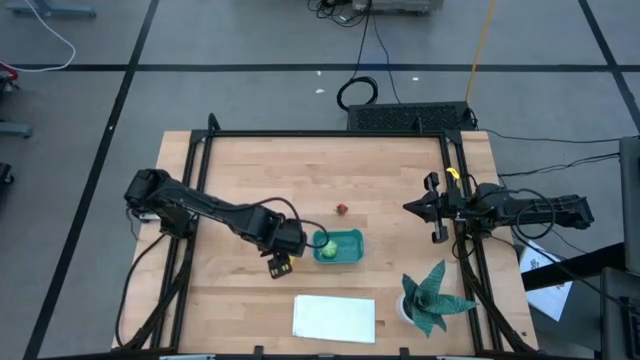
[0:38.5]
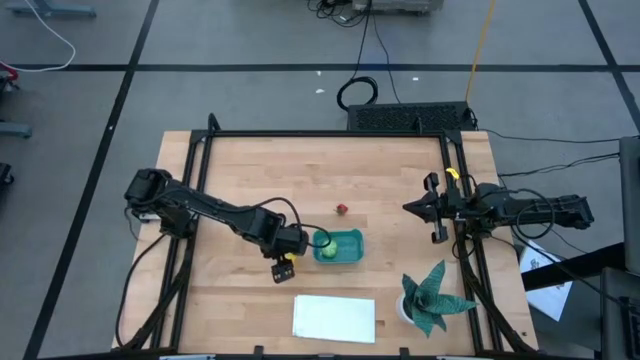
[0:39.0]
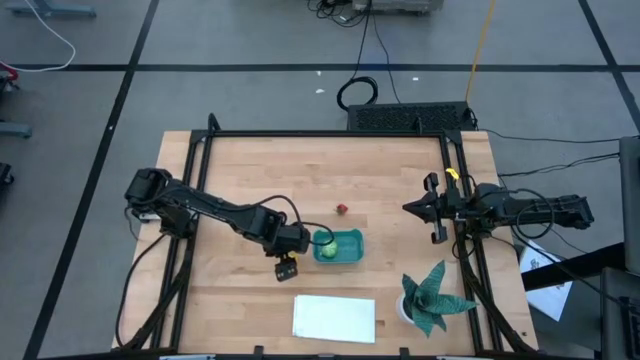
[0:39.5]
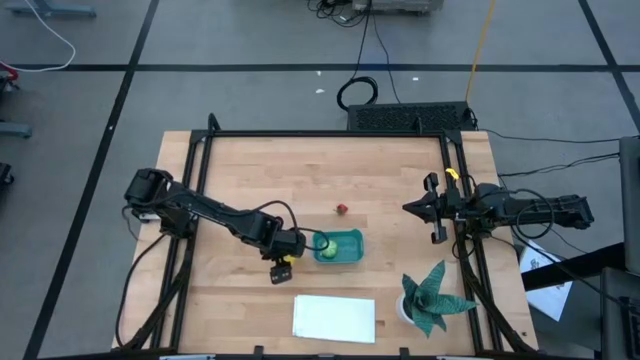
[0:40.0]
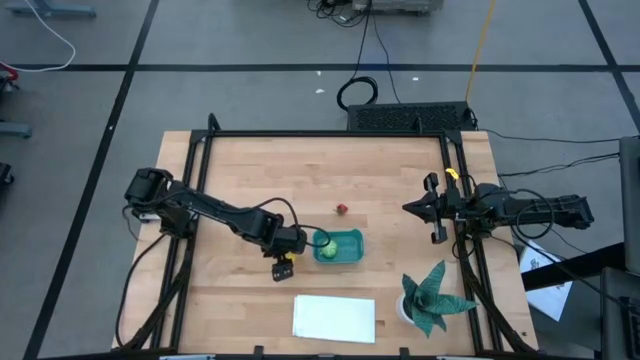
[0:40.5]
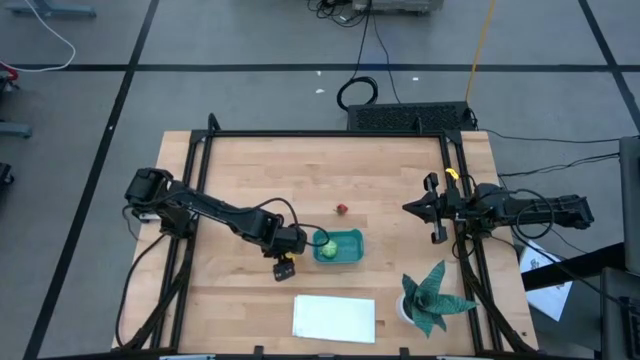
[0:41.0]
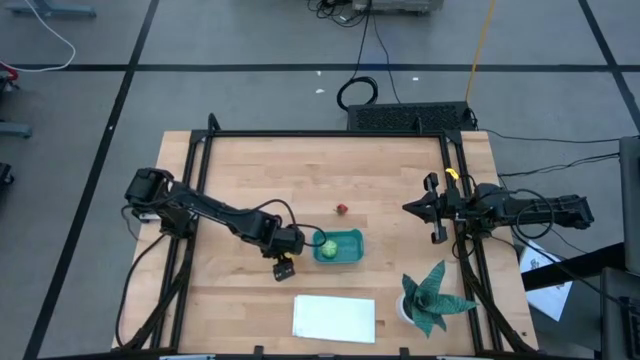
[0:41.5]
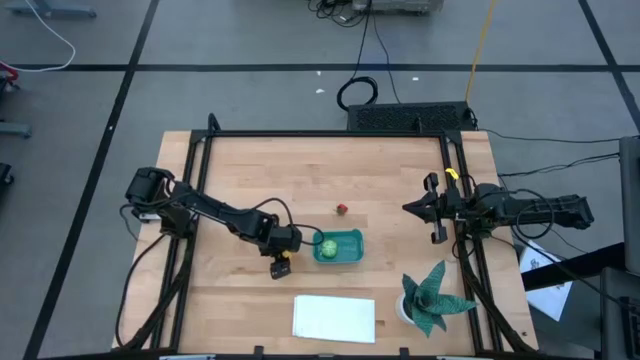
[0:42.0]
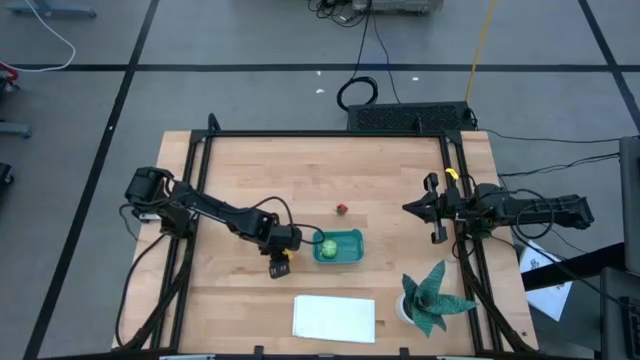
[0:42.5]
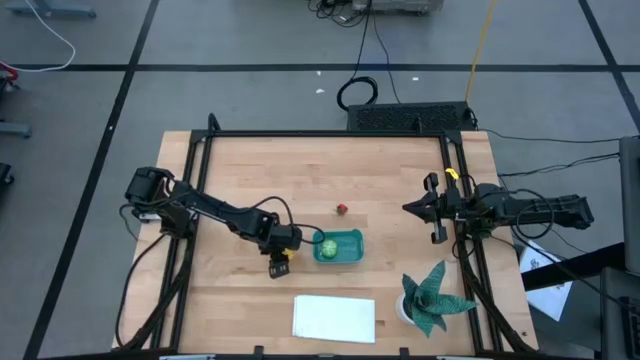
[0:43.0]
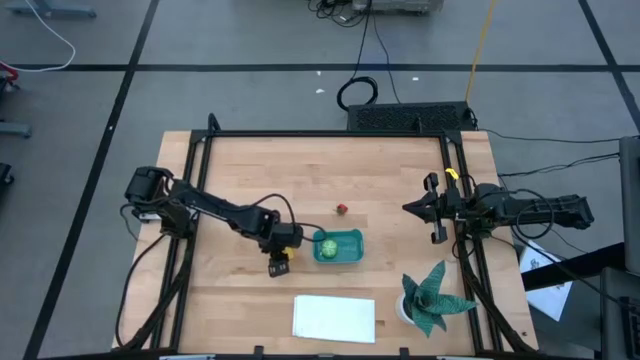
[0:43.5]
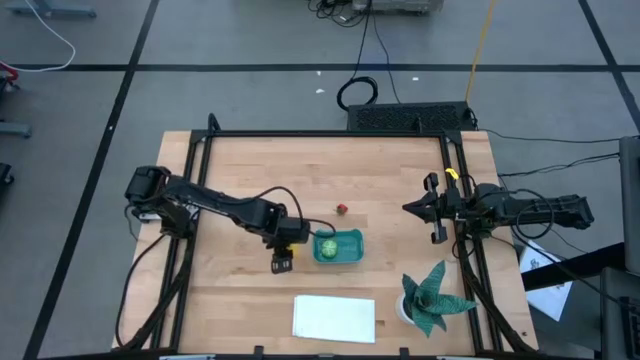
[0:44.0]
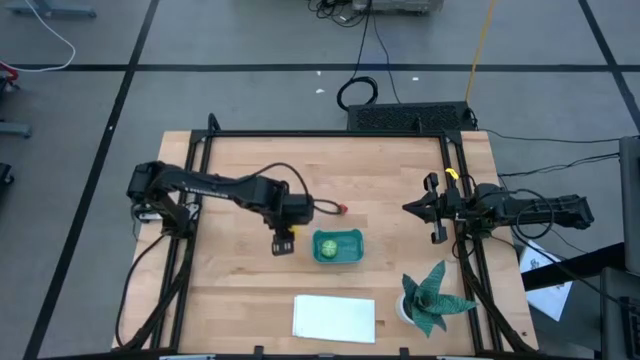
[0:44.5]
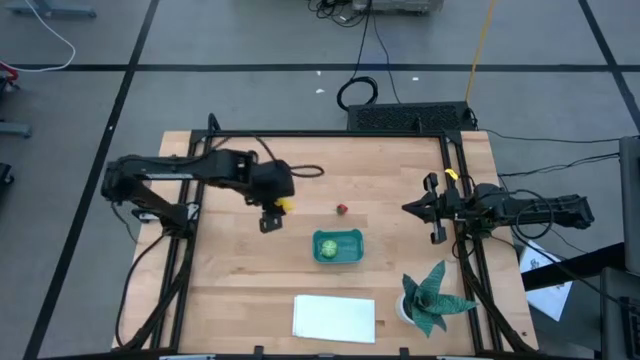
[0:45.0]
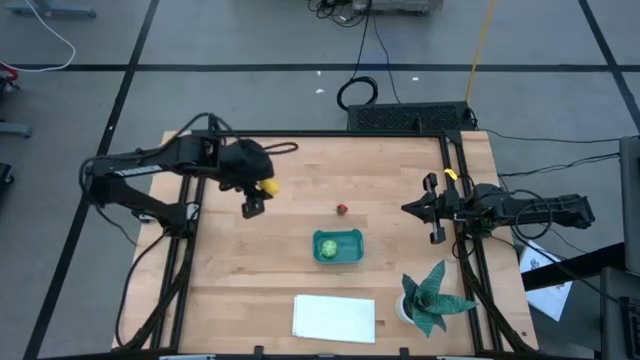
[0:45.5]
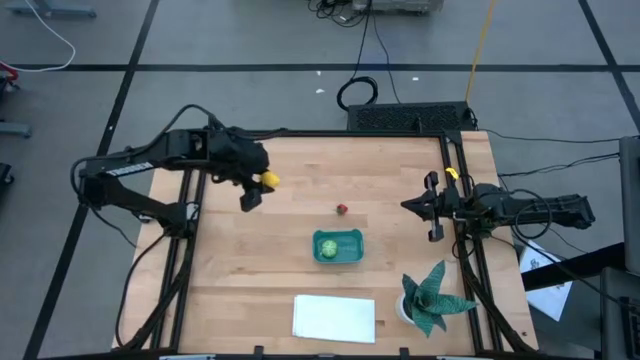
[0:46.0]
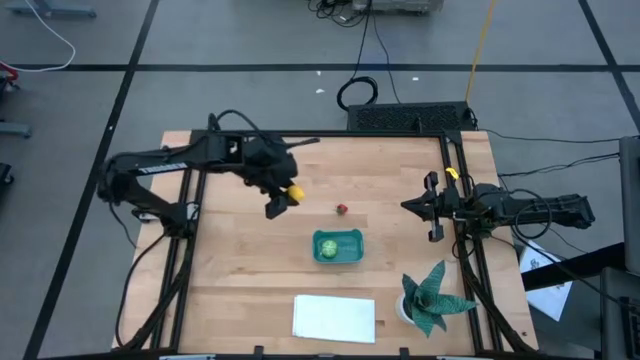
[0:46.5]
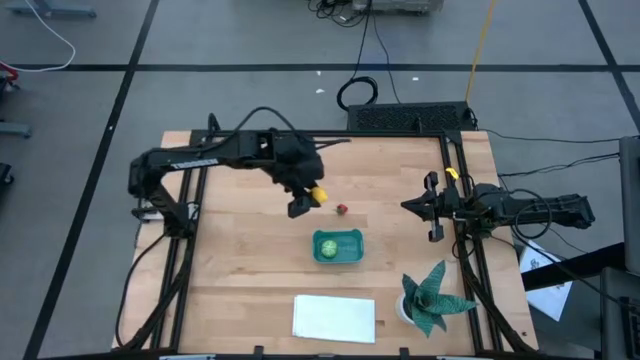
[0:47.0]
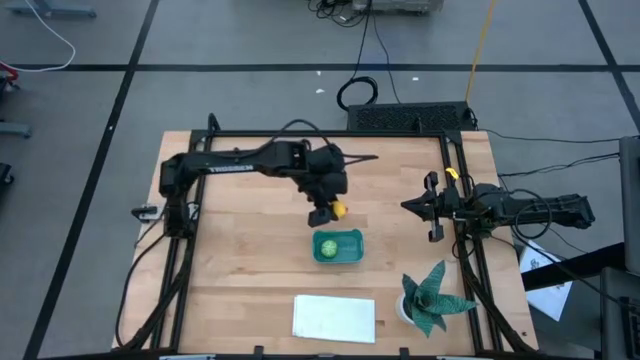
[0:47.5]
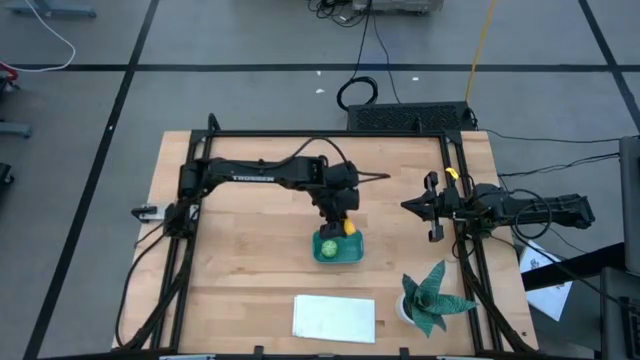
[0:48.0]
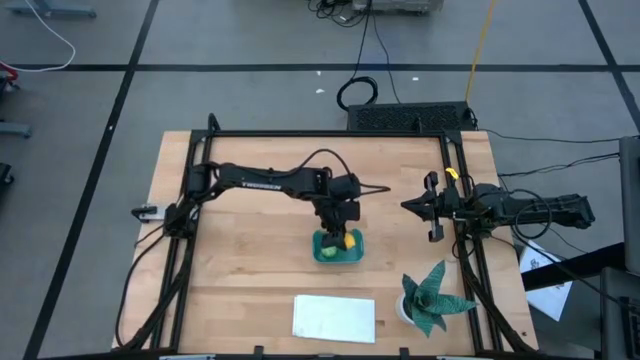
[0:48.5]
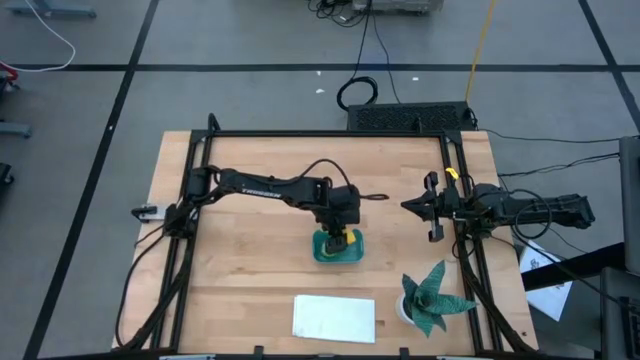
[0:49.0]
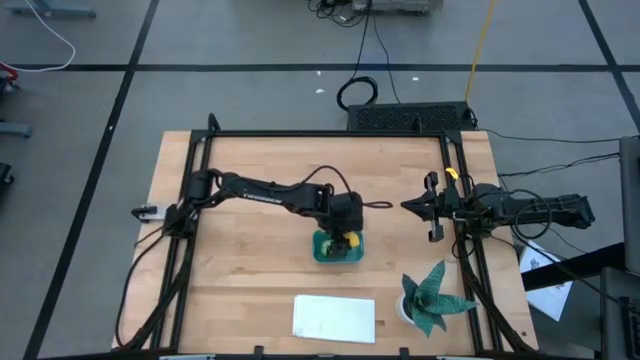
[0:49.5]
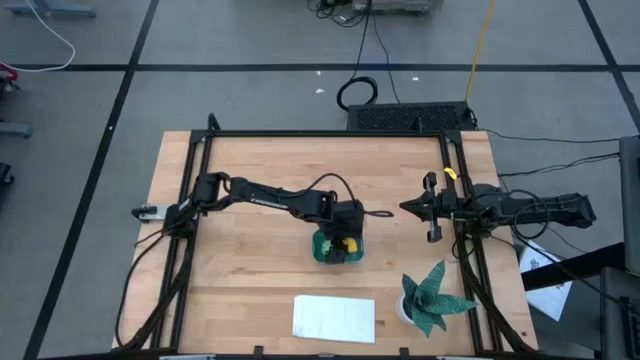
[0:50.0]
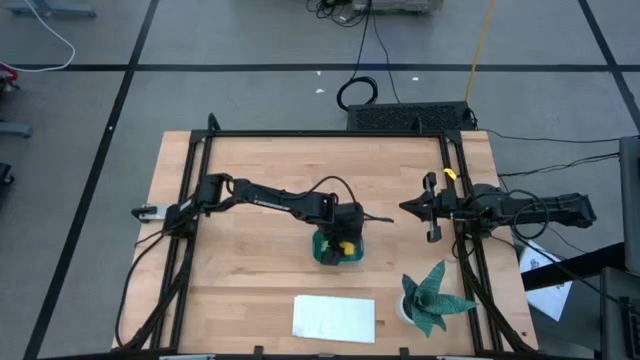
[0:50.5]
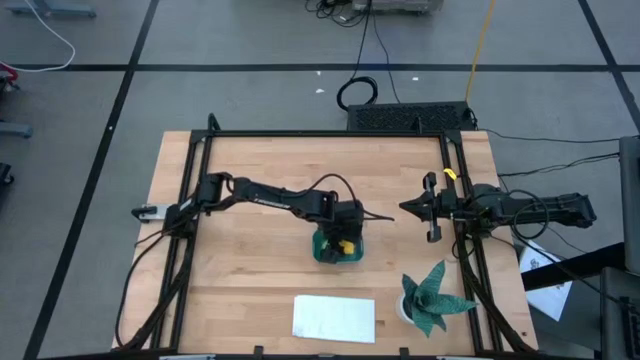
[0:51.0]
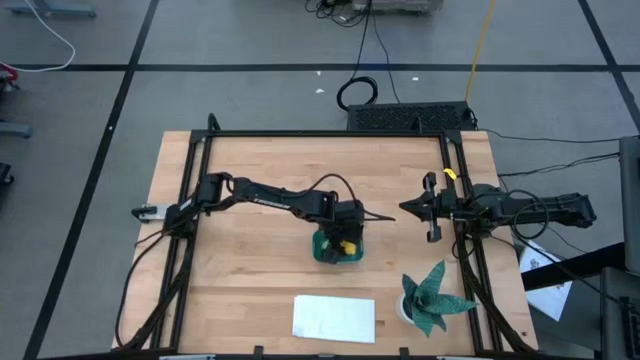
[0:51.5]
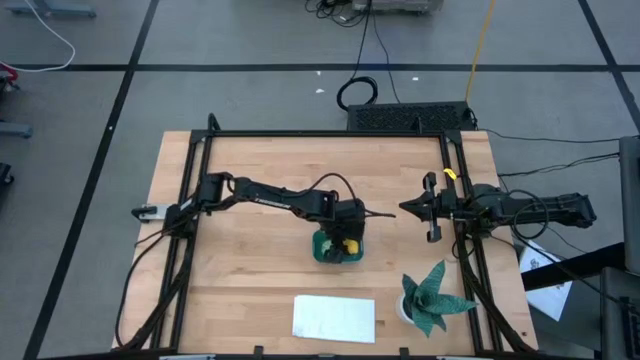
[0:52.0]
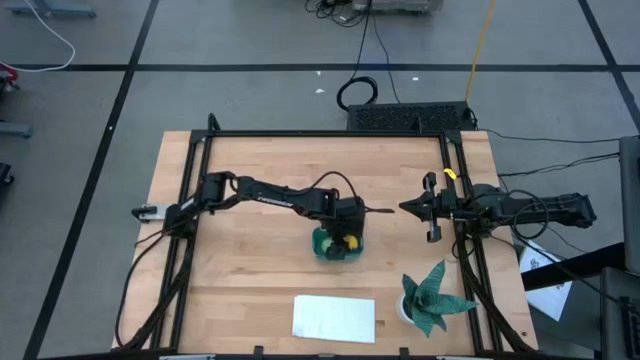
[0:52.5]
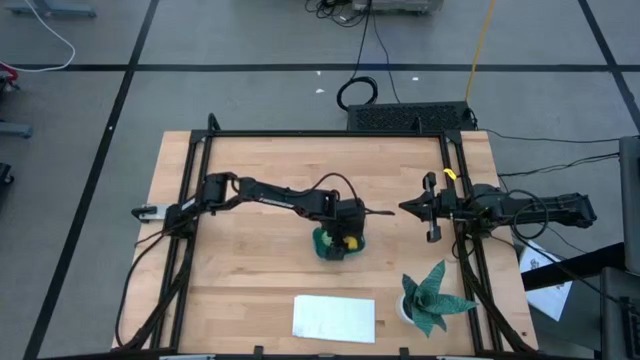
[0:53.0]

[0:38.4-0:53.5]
Task: Pick and placing Produce into tupperware
Put the lemon into the bin

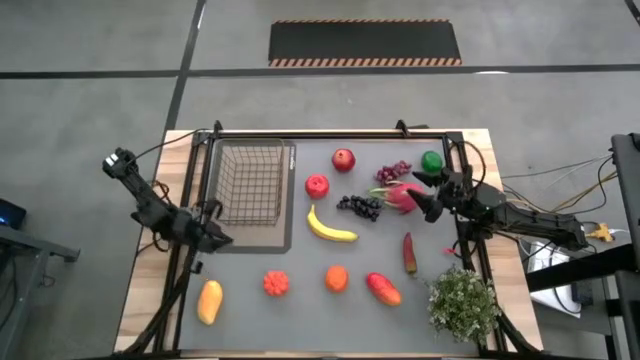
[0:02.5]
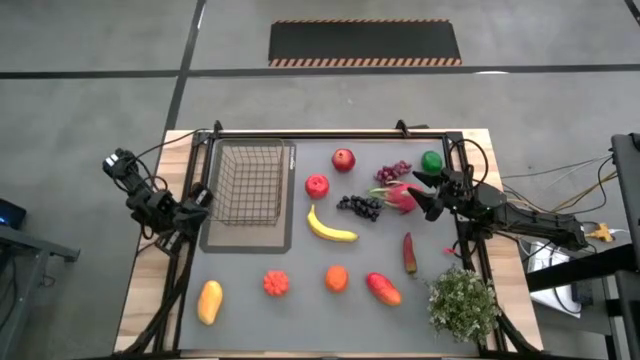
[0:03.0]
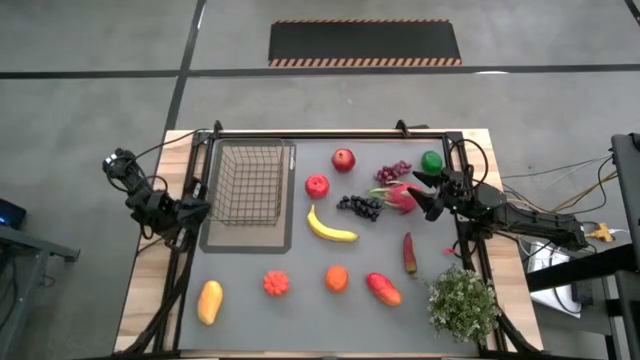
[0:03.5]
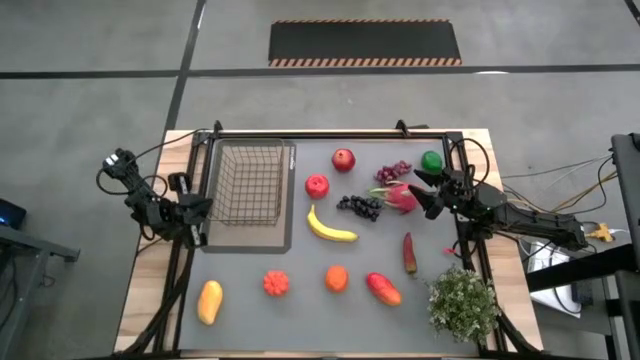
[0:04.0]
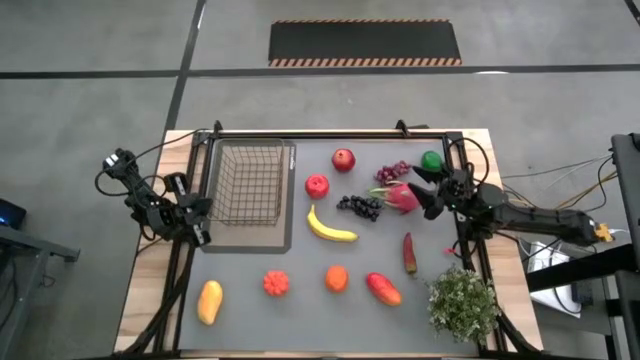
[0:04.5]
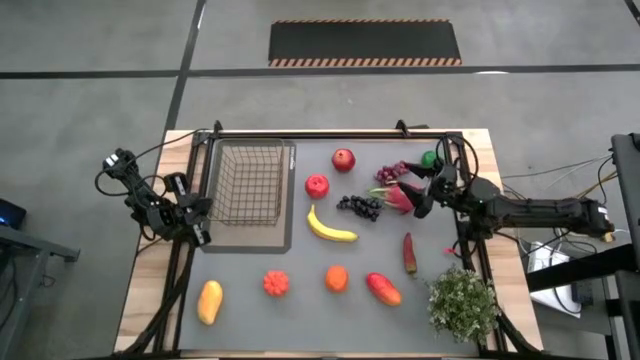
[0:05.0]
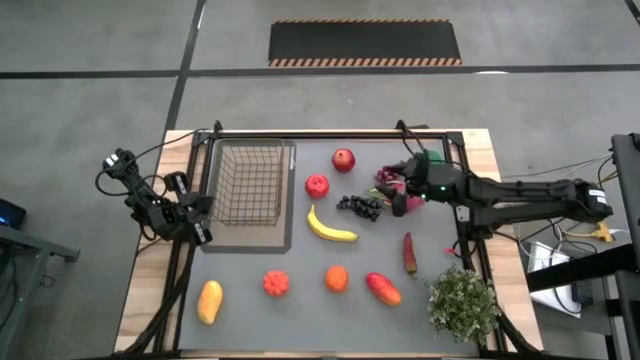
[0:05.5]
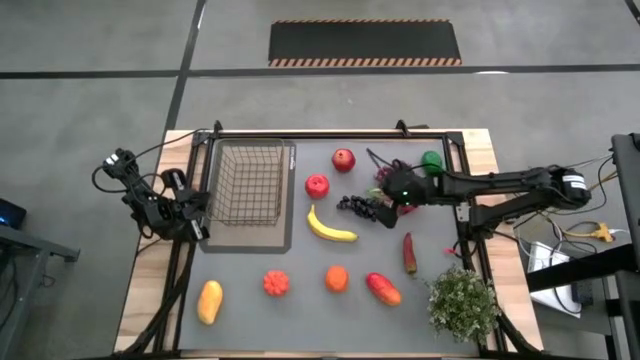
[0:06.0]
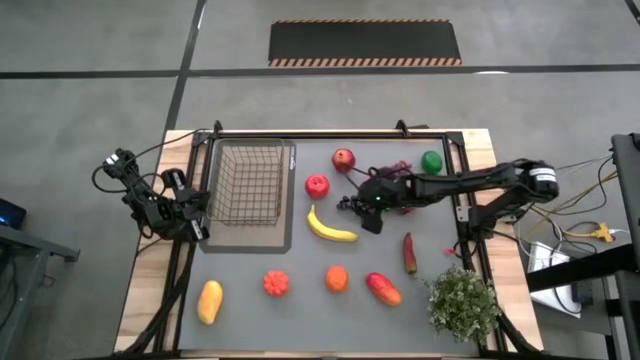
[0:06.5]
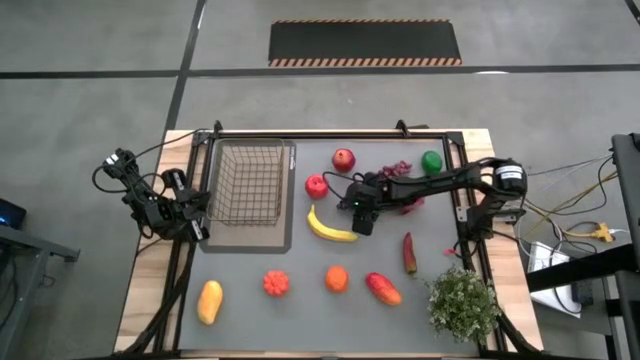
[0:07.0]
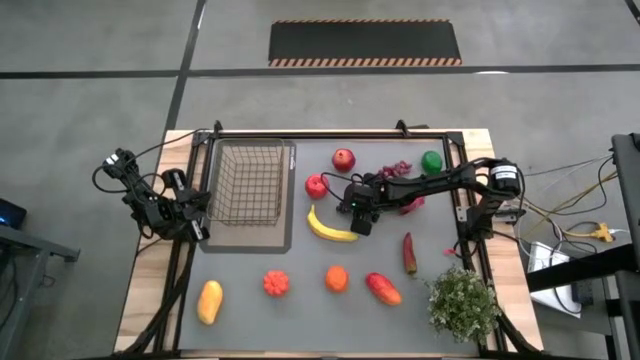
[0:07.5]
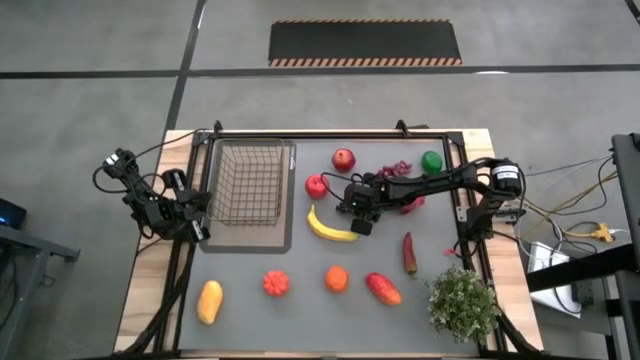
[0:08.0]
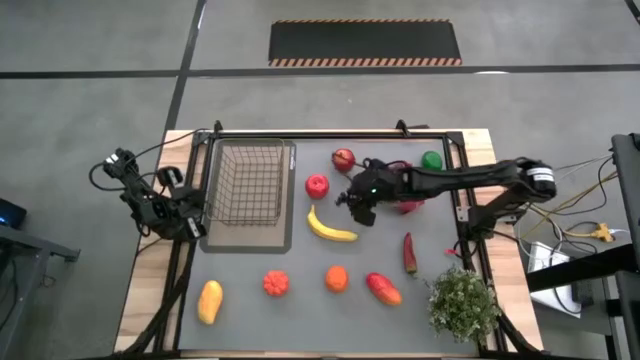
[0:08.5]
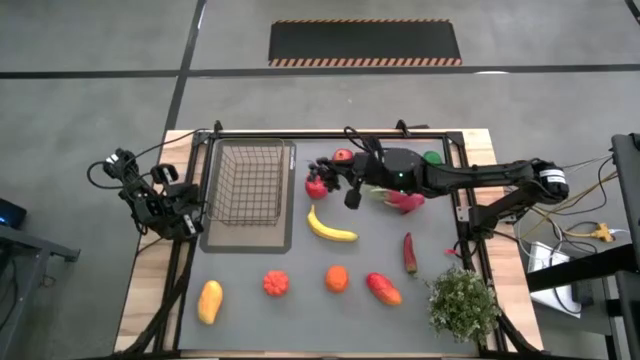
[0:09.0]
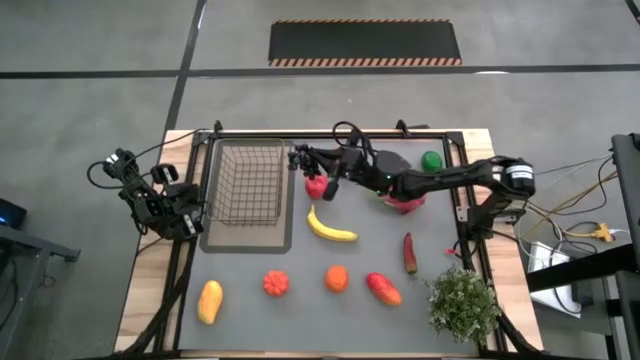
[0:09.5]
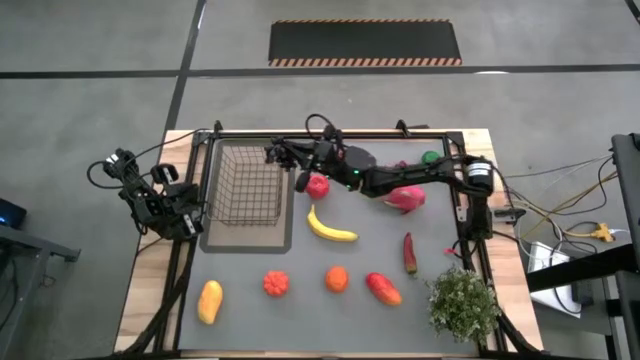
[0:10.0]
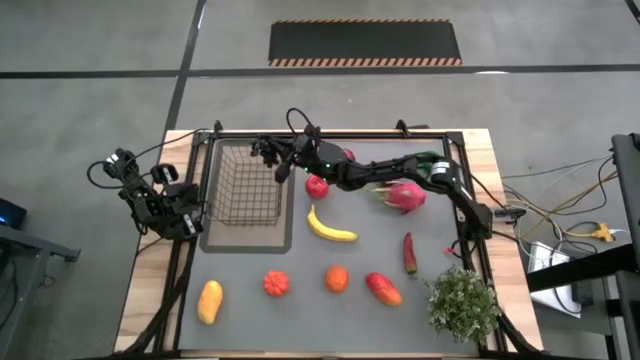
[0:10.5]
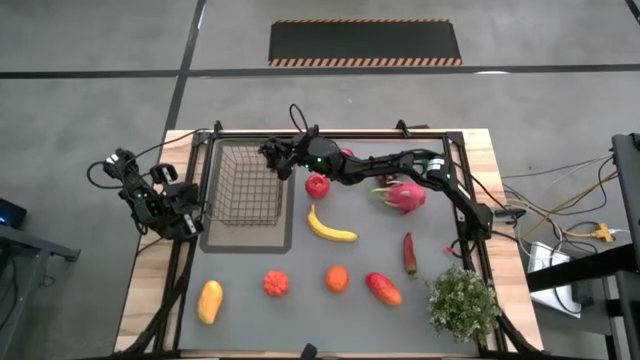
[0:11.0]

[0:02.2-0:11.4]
Task: Build produce basket
Put the purple grapes into the gold wire basket
